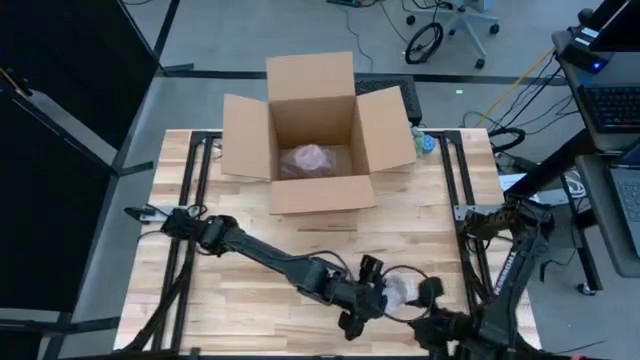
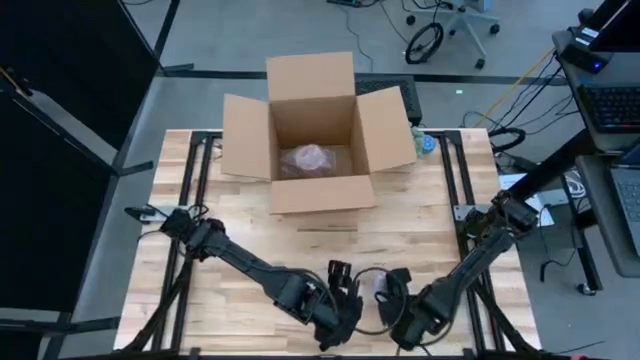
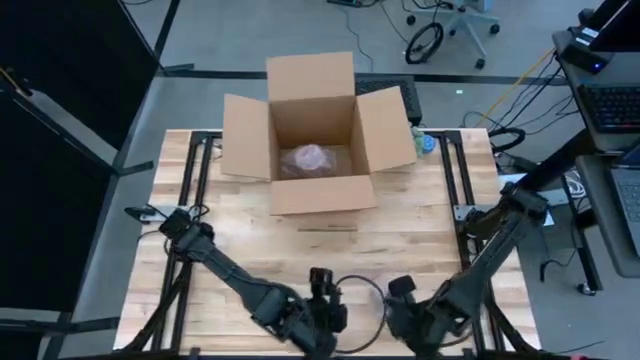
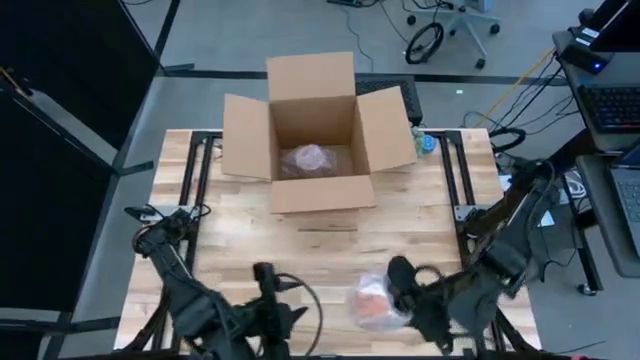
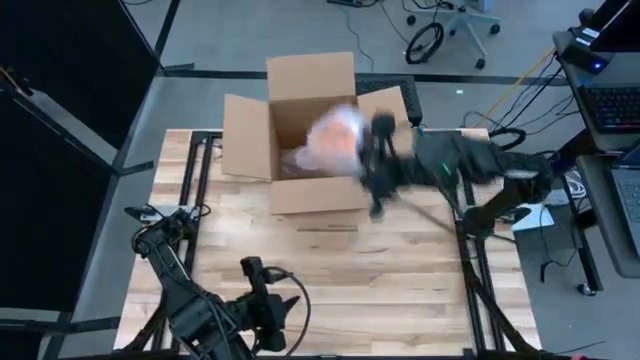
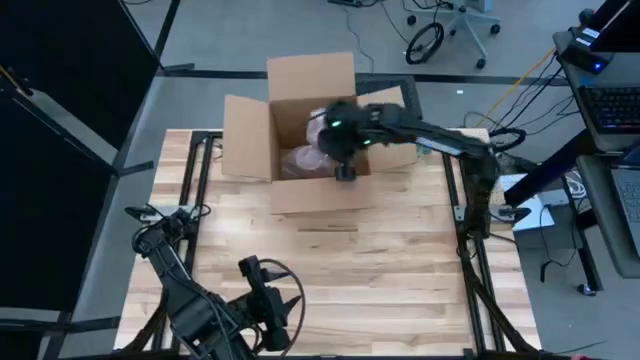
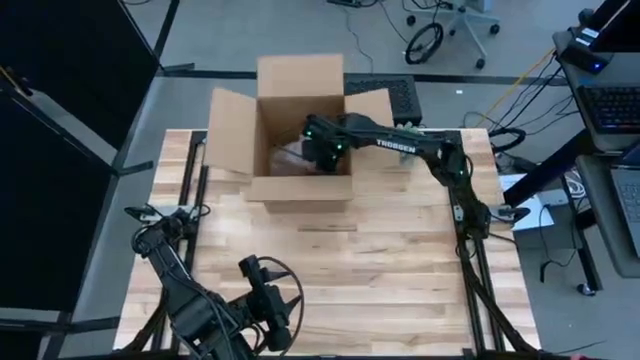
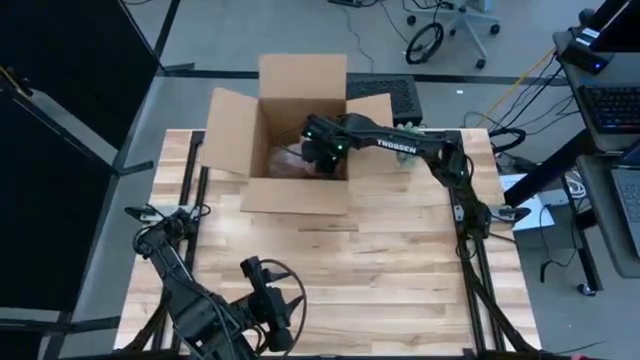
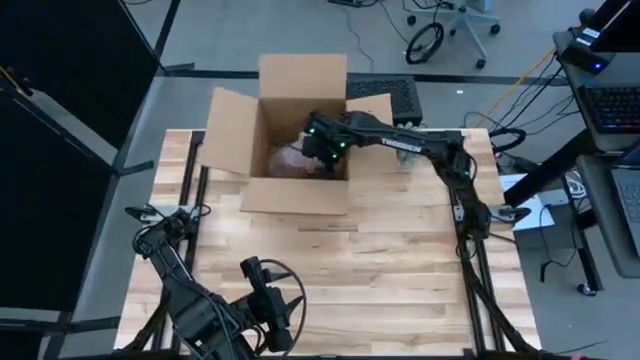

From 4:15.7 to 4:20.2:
Task: wrap mug
Put the wrapped orange mug into the brown cardboard box

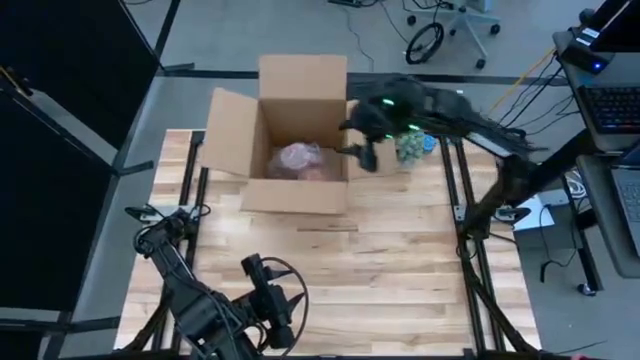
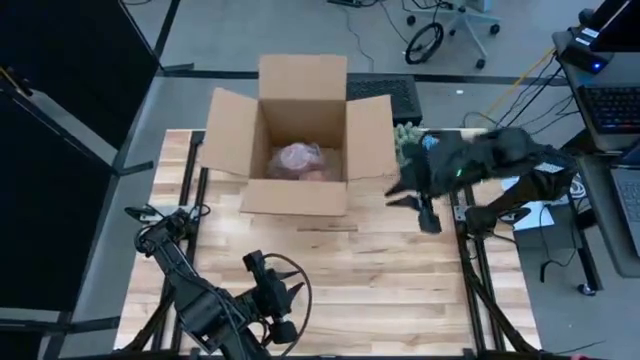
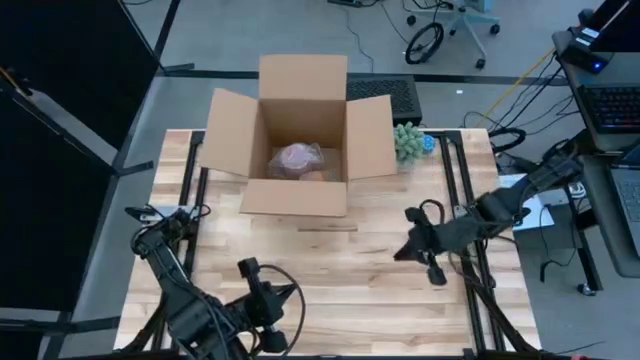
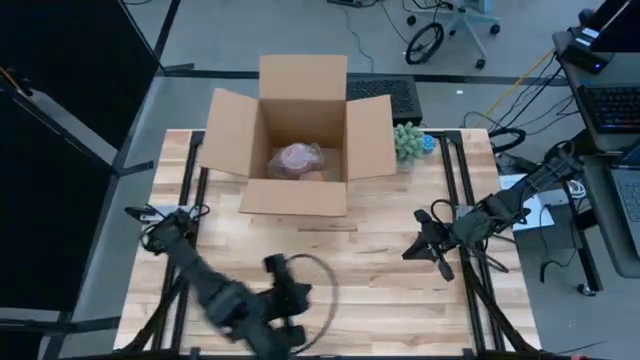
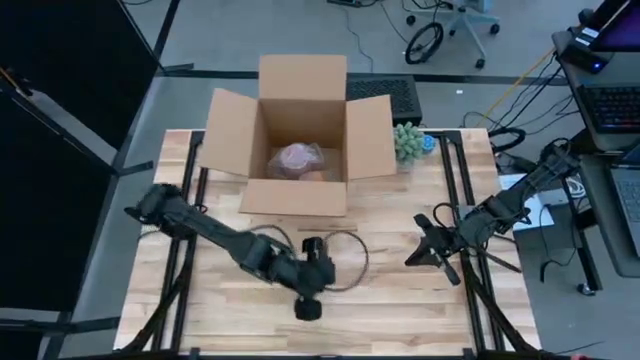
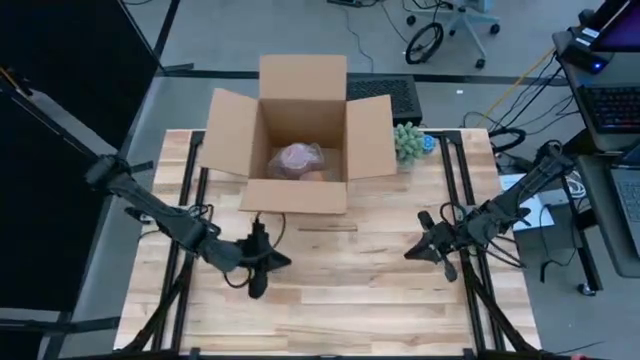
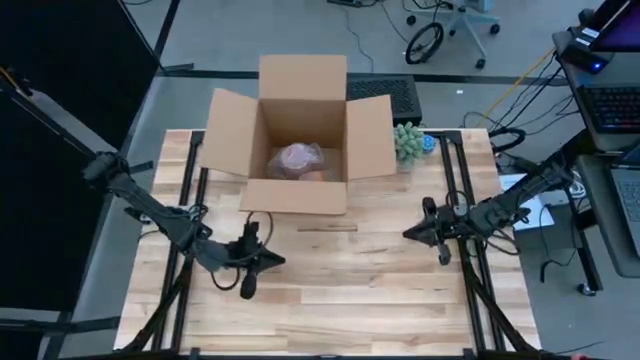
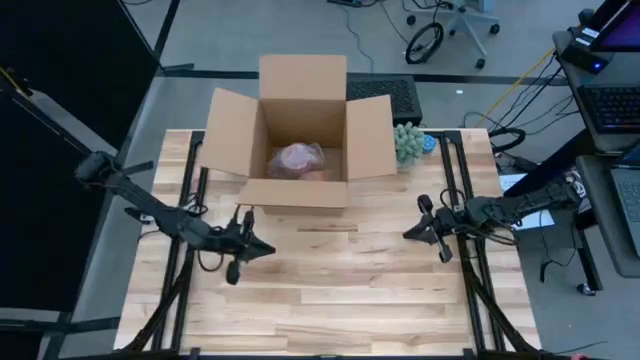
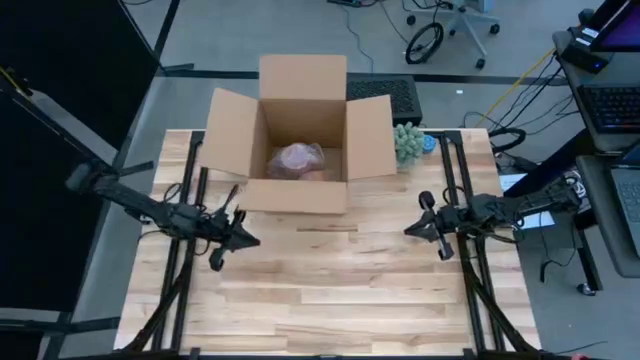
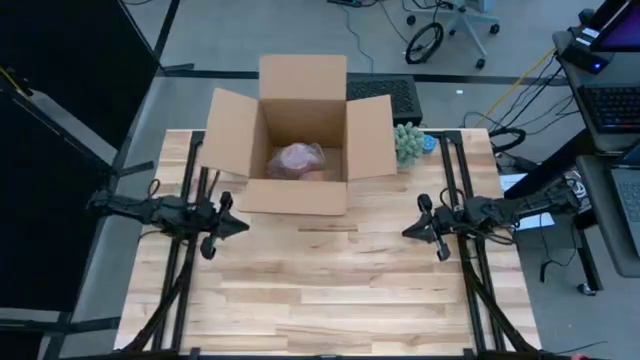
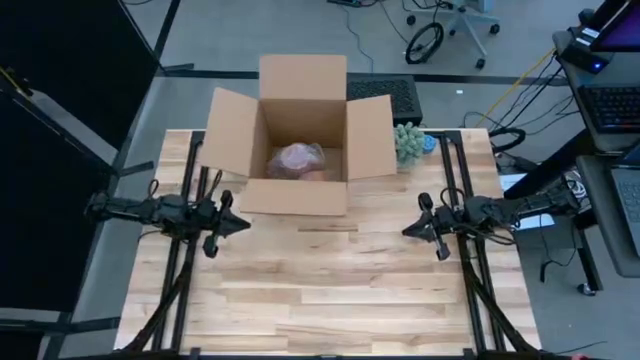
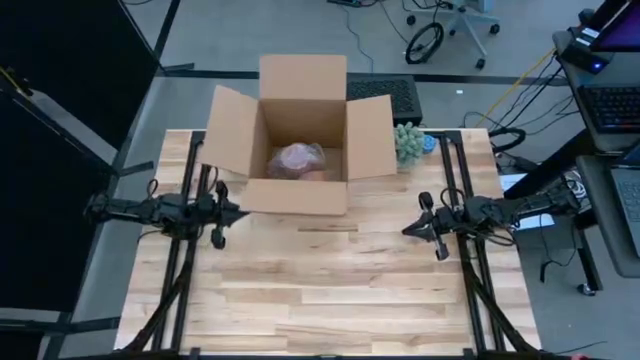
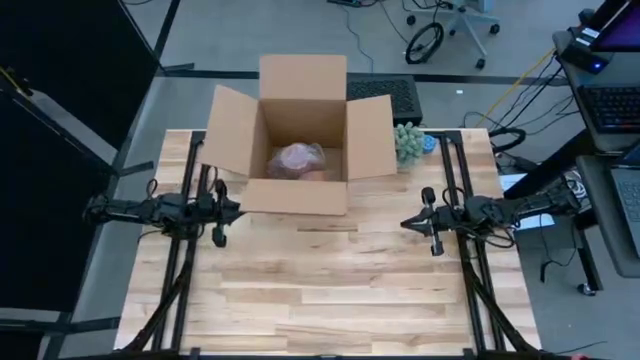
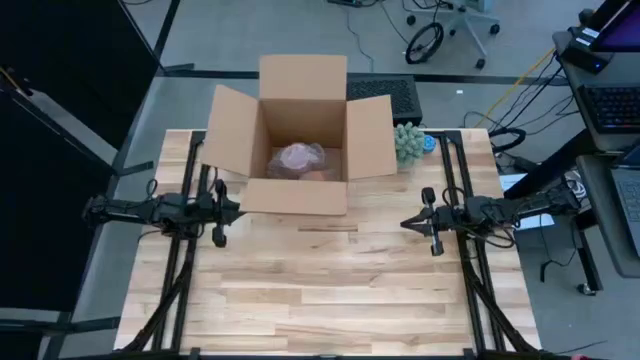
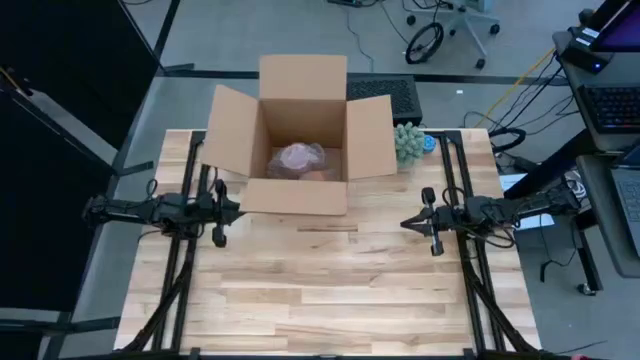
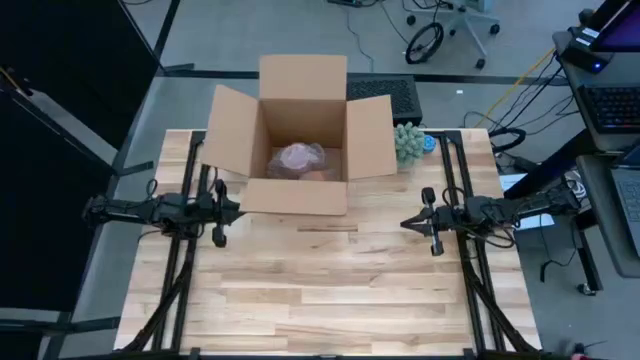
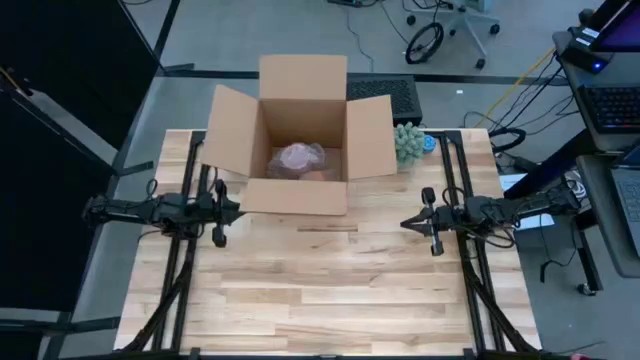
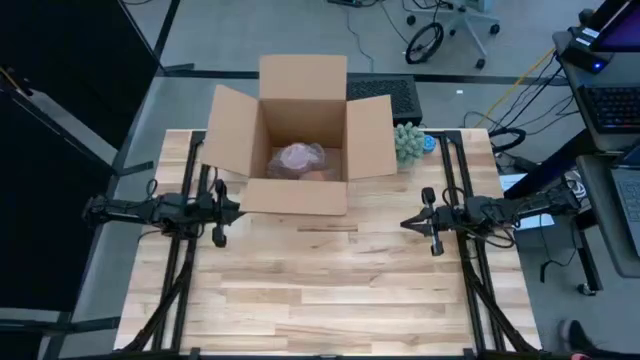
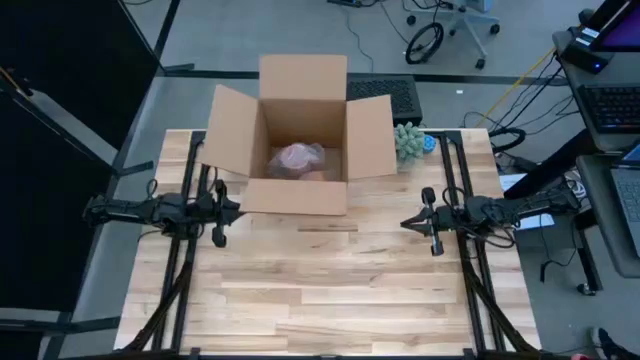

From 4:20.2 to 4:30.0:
Return to Home Position
